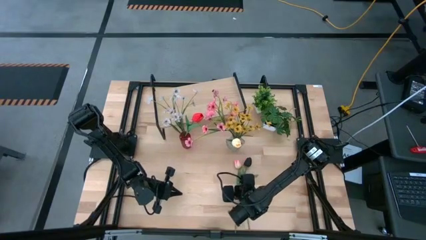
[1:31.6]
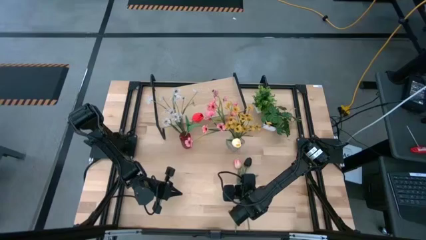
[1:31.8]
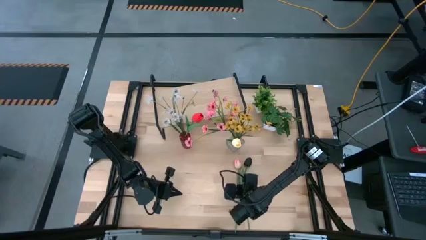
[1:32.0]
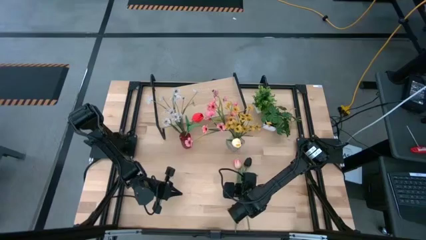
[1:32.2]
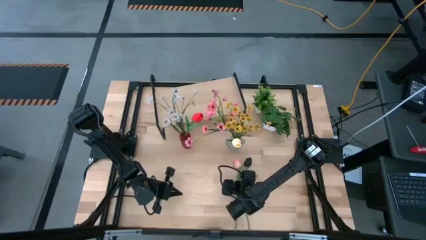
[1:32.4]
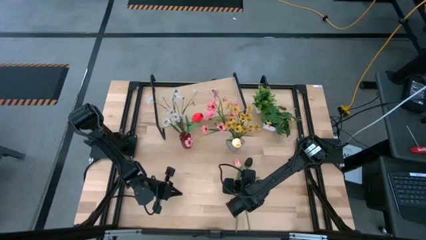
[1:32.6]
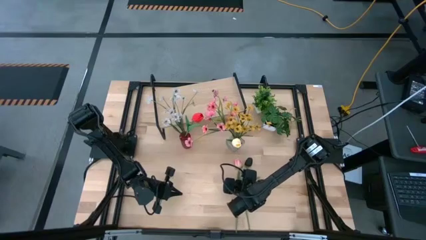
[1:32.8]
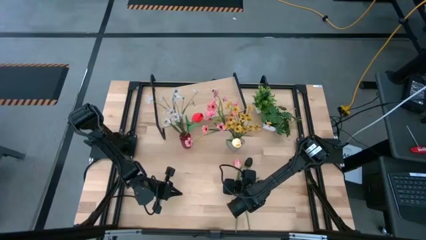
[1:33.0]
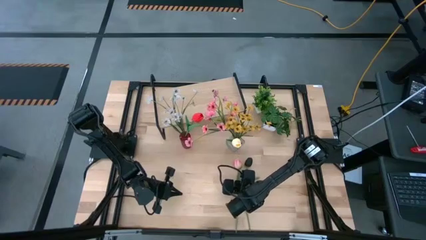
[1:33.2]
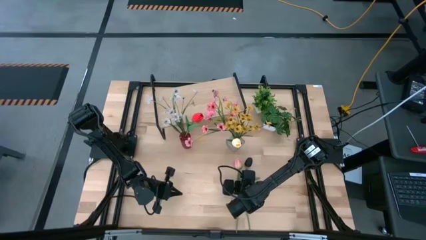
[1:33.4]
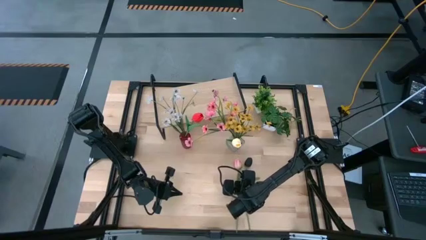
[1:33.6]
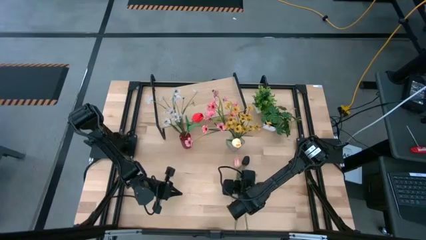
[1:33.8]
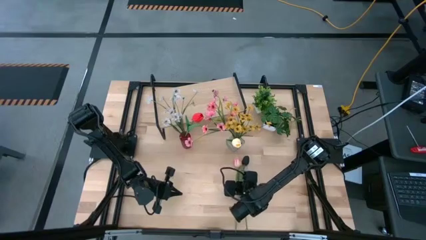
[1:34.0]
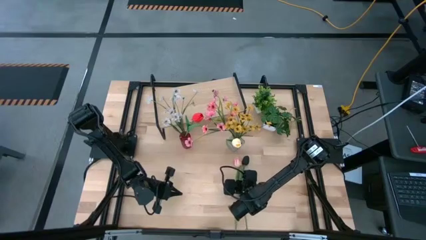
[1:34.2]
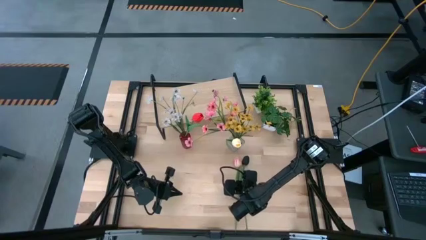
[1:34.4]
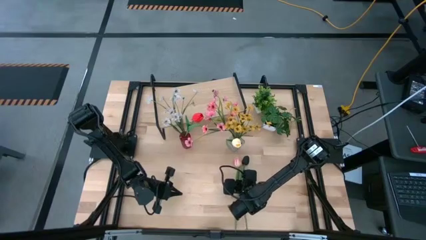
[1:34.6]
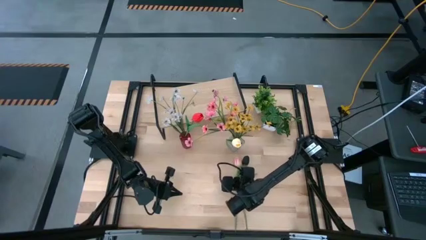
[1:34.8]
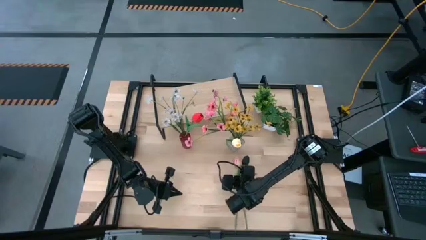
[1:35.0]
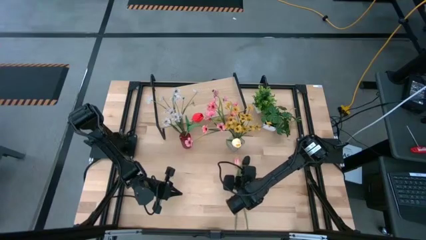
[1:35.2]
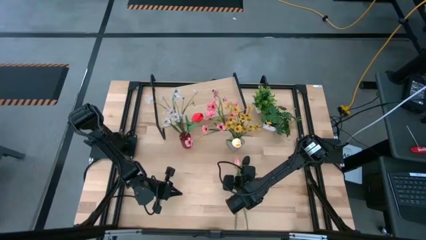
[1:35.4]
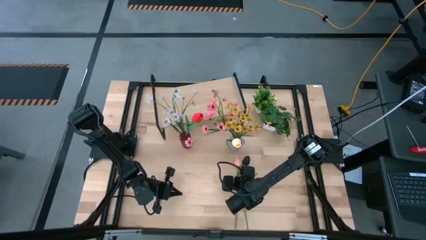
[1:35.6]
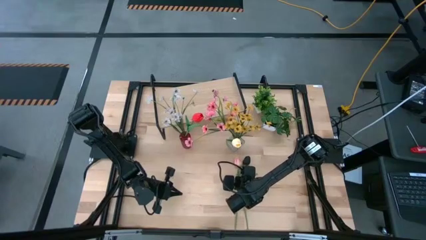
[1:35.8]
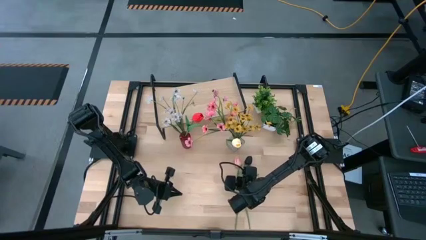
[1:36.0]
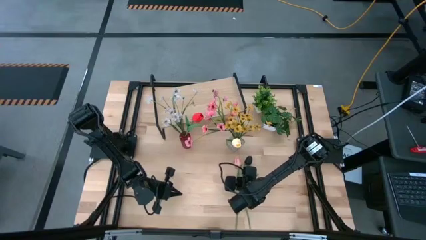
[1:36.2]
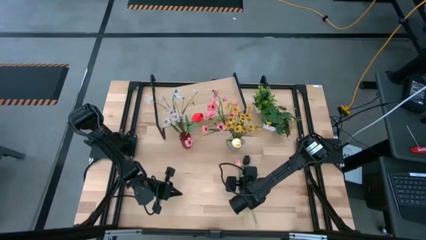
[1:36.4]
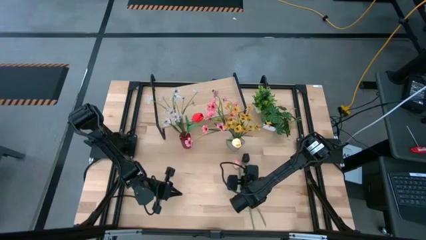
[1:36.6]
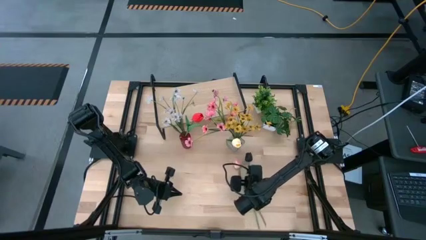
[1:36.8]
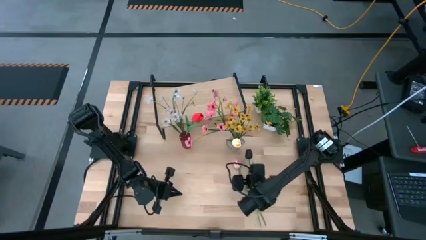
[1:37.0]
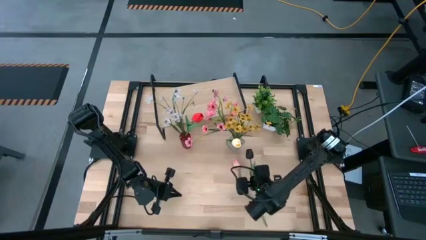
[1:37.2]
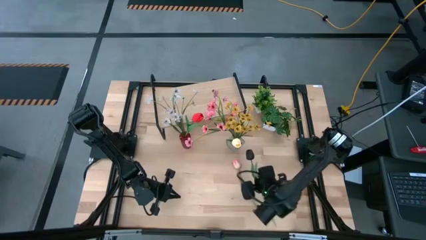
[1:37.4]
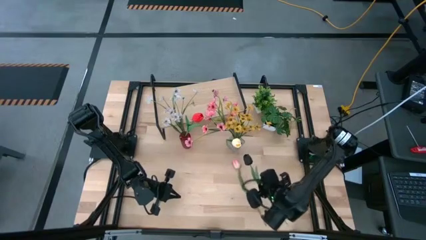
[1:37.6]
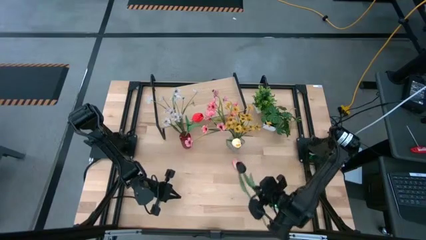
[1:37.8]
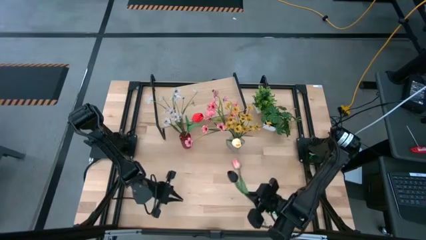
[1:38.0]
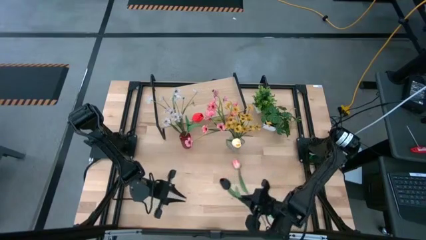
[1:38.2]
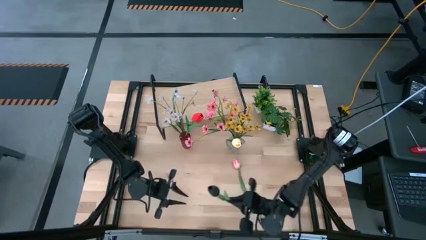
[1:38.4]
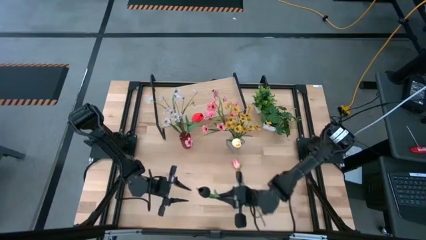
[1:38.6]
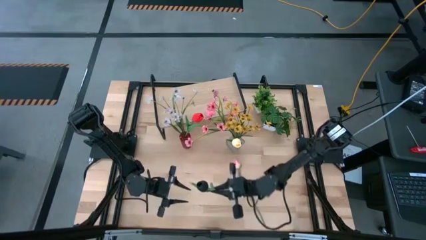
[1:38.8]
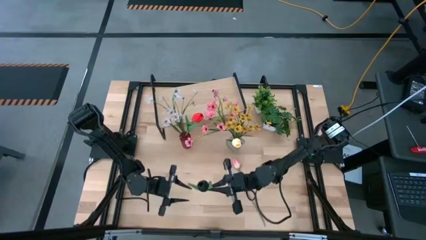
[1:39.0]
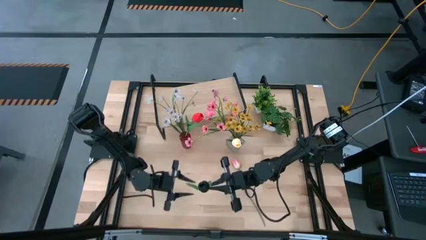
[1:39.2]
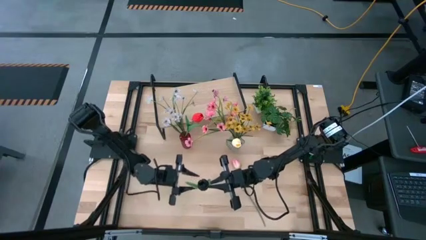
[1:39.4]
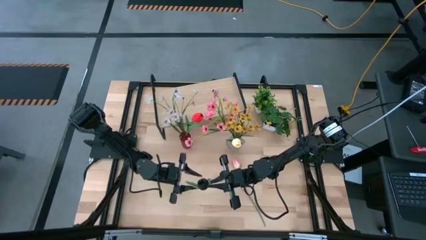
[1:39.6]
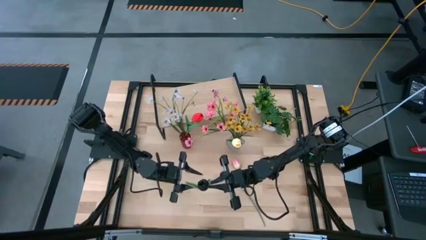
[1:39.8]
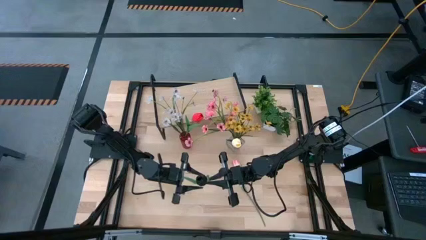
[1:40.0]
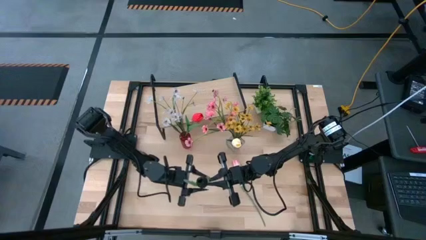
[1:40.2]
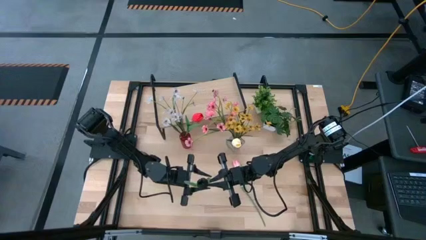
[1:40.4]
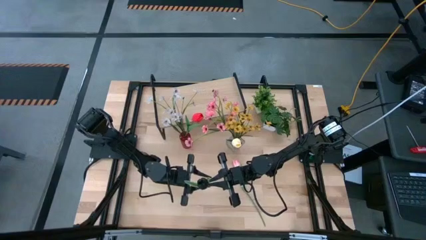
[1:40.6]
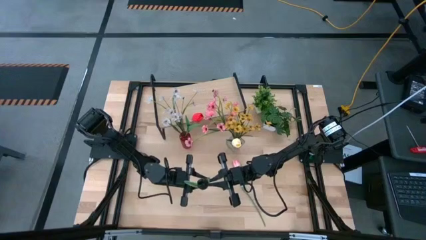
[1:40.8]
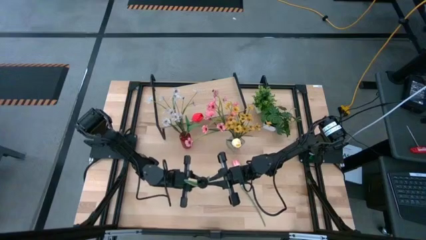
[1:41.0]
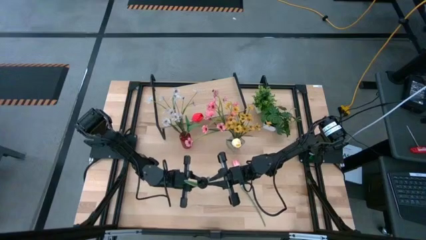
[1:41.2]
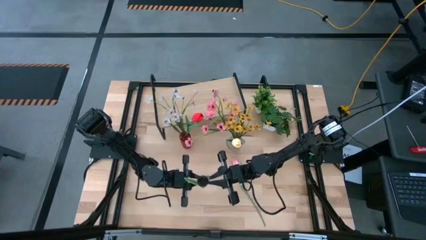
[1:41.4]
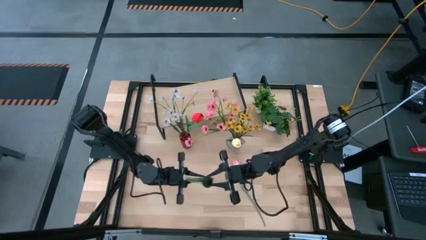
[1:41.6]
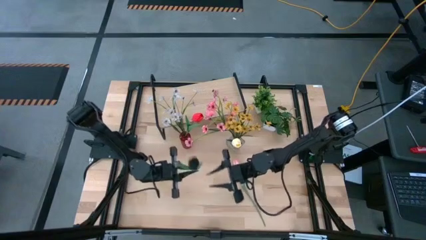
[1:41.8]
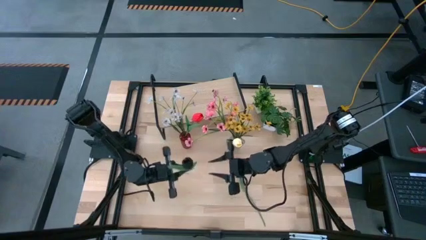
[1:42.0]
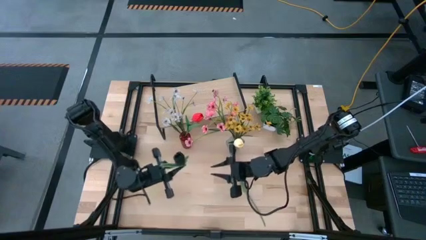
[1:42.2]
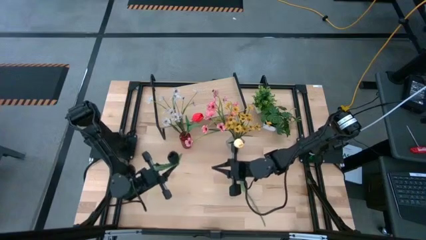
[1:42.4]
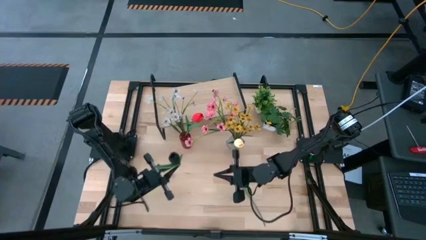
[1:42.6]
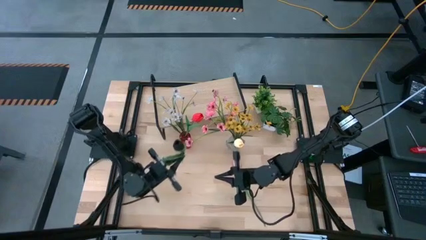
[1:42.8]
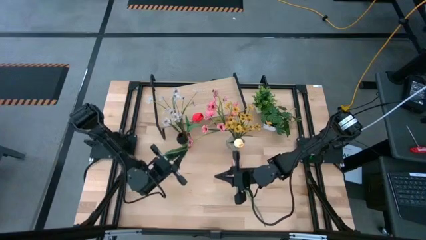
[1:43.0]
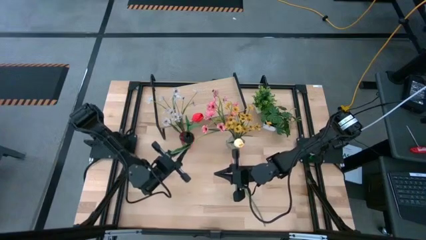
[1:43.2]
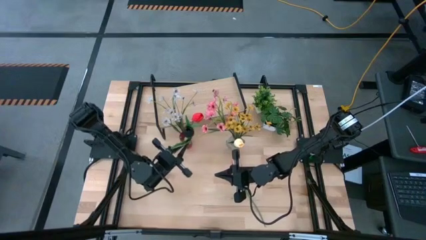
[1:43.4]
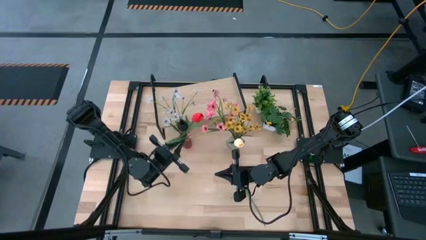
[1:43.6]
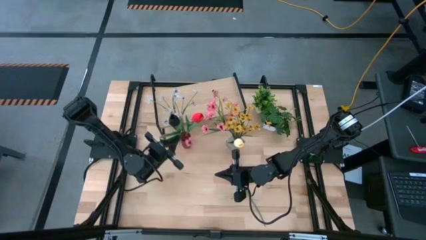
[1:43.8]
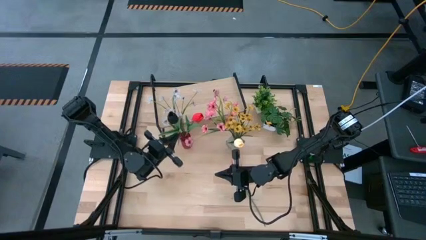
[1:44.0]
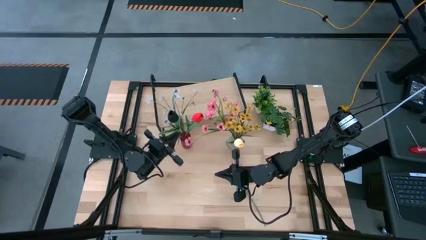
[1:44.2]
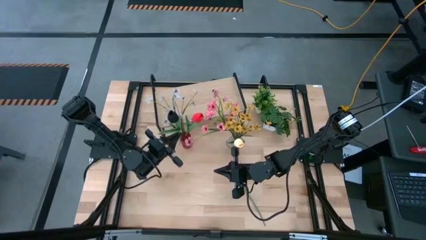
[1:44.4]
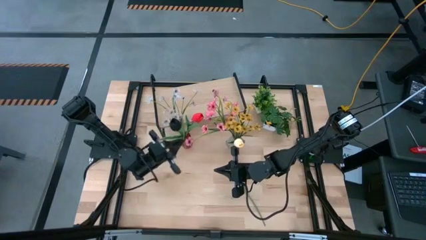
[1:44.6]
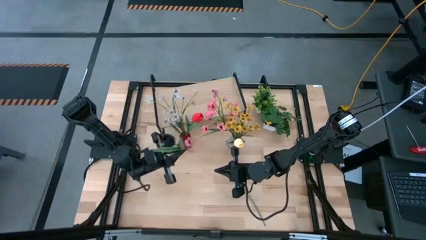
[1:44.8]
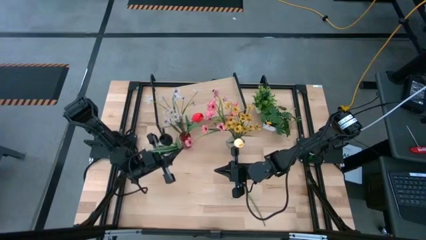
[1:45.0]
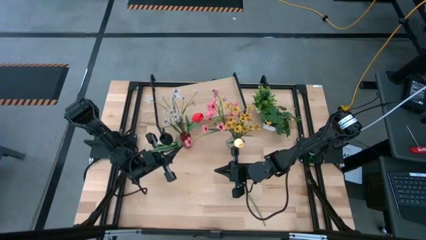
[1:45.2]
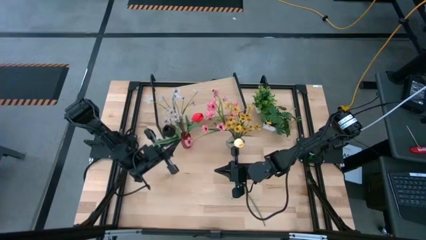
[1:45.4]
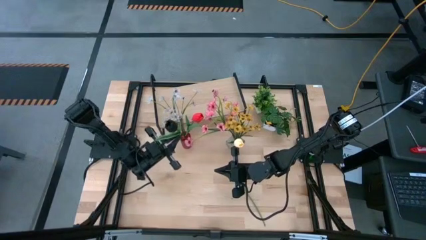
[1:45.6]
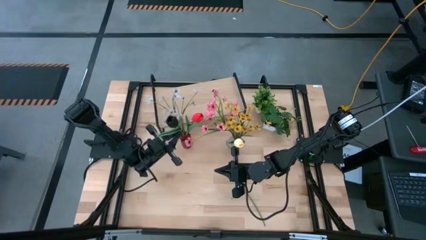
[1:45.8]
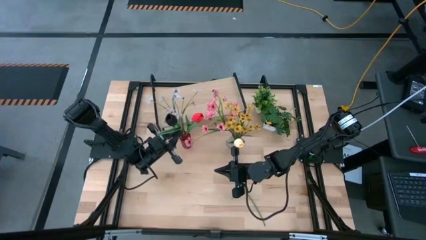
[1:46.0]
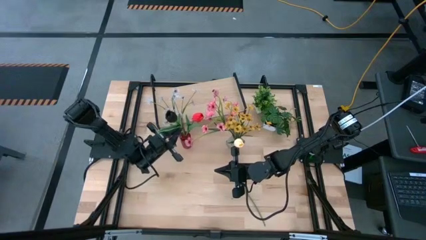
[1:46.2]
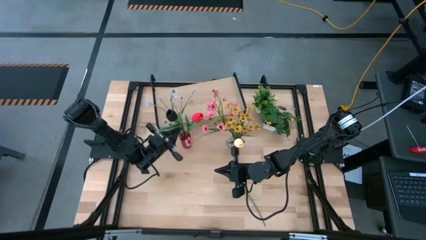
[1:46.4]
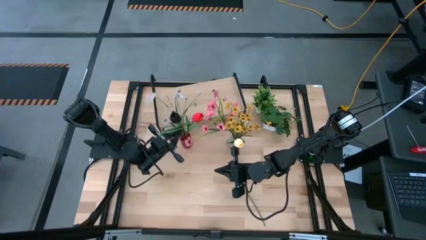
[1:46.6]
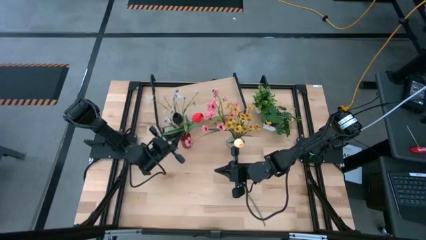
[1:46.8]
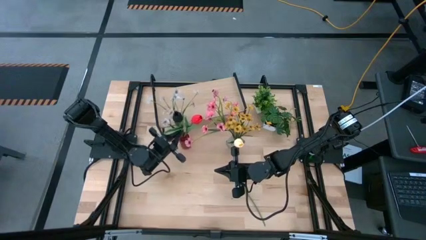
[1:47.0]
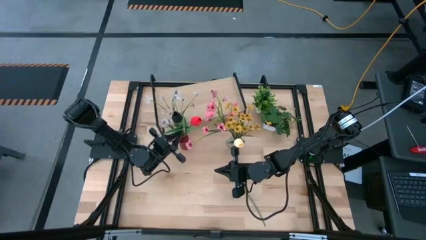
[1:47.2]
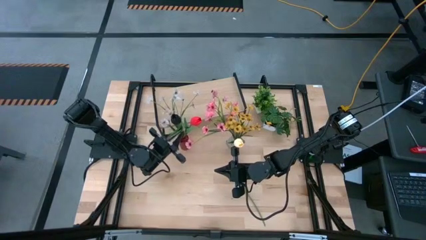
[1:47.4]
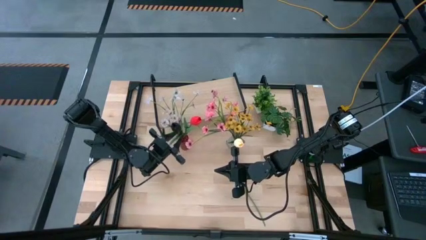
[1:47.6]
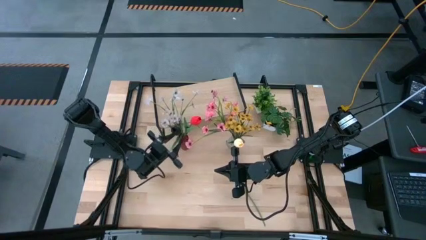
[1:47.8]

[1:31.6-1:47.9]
Task: Pick and place flowers into a vace then onto a shelf
Put the black flower into the red flower vase
